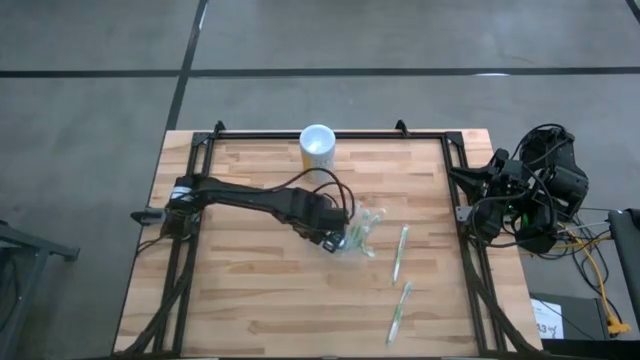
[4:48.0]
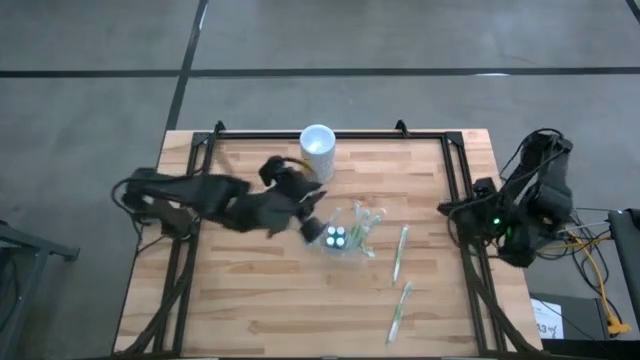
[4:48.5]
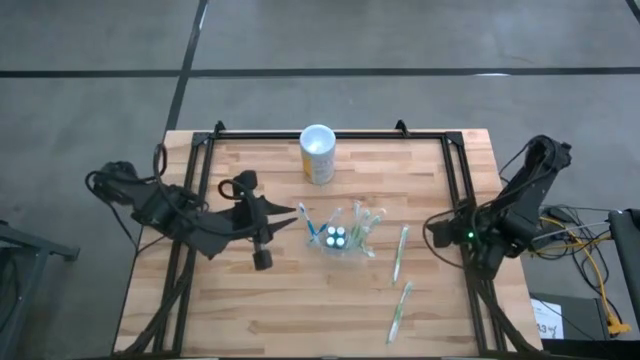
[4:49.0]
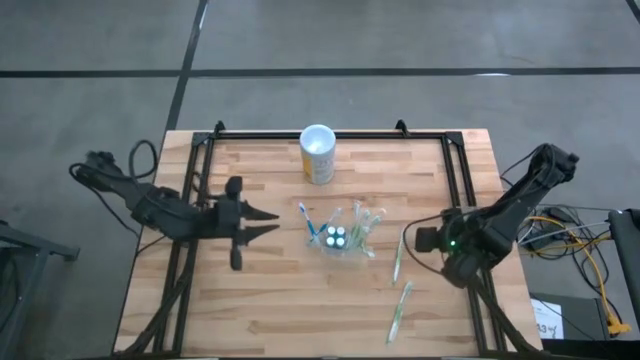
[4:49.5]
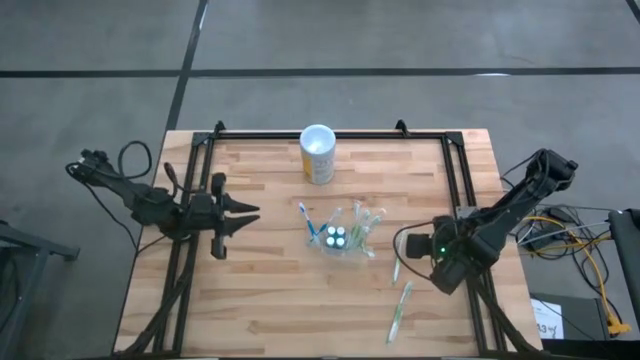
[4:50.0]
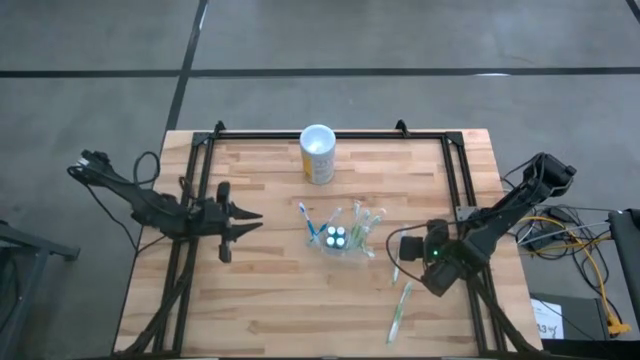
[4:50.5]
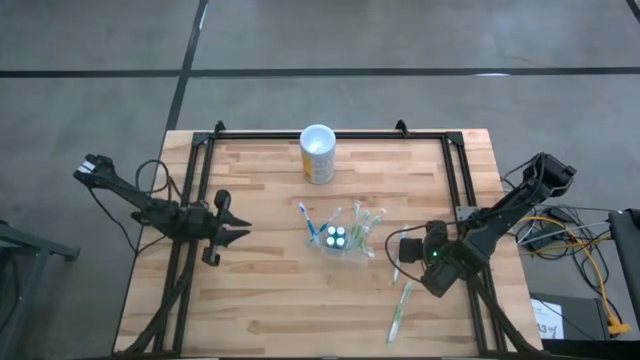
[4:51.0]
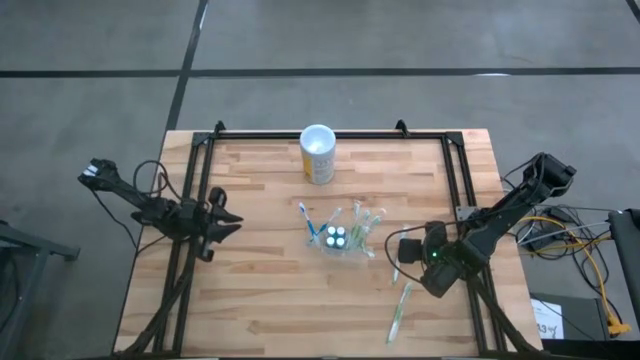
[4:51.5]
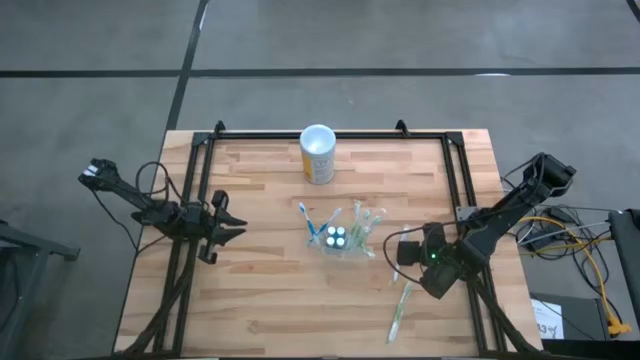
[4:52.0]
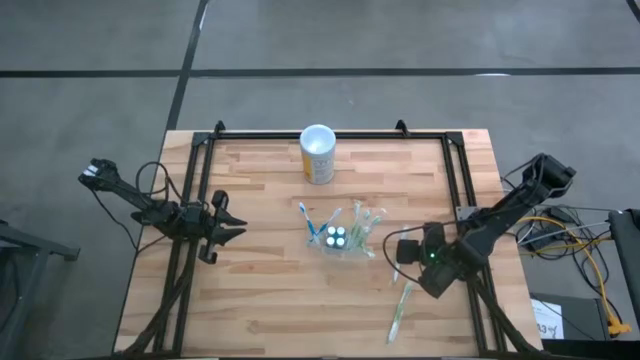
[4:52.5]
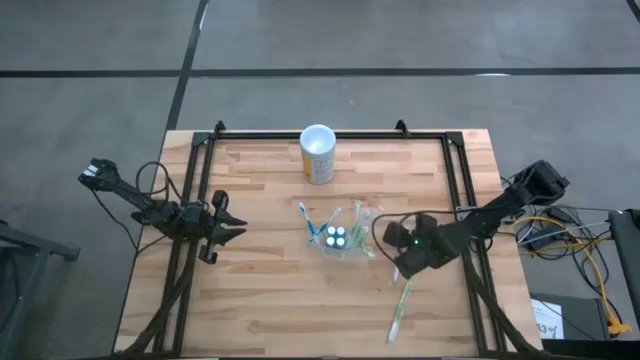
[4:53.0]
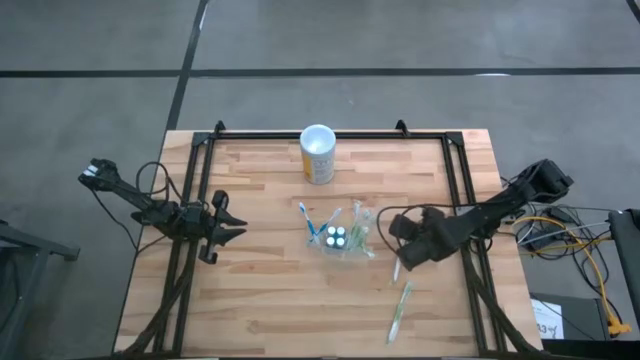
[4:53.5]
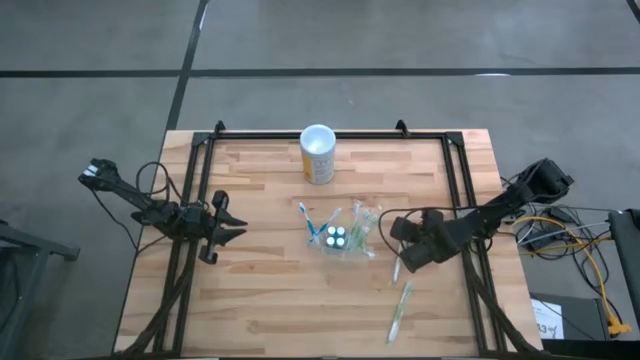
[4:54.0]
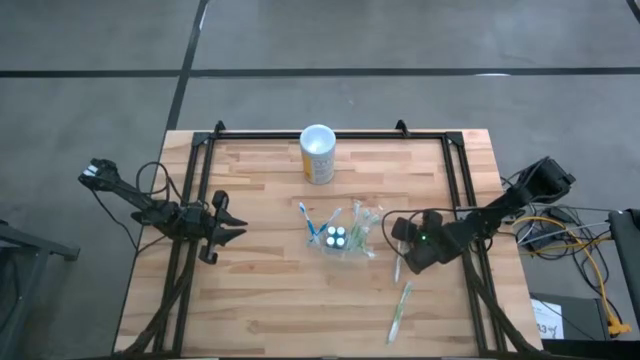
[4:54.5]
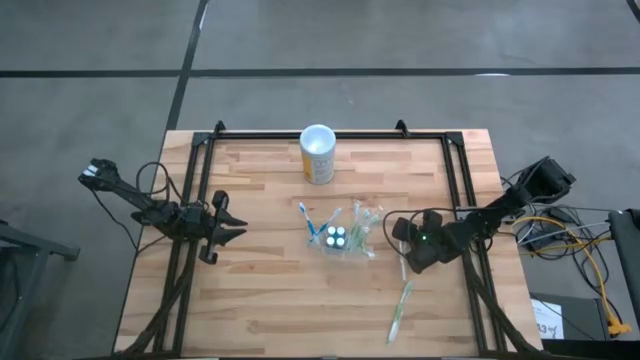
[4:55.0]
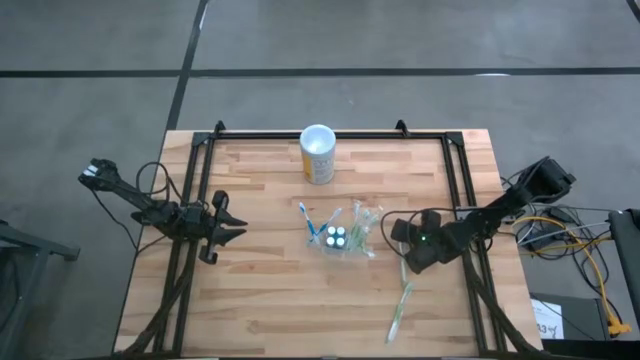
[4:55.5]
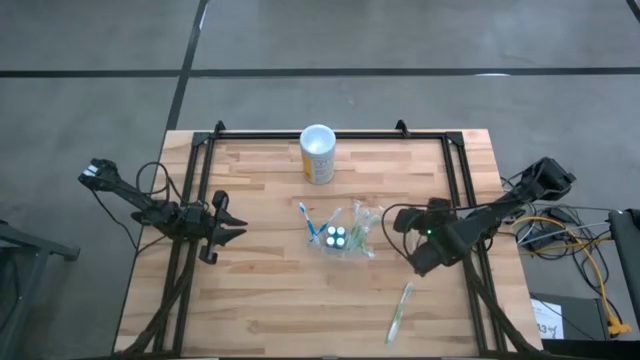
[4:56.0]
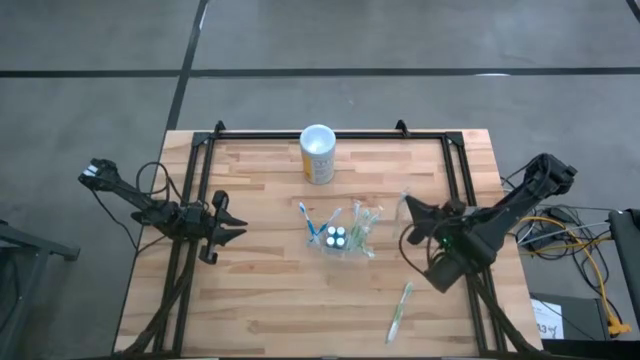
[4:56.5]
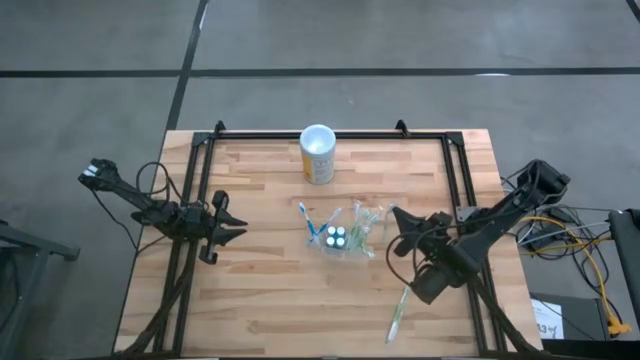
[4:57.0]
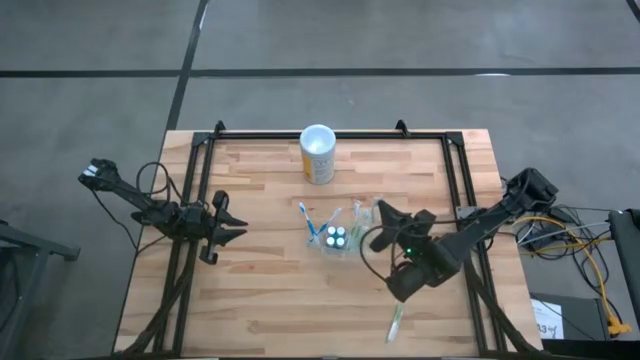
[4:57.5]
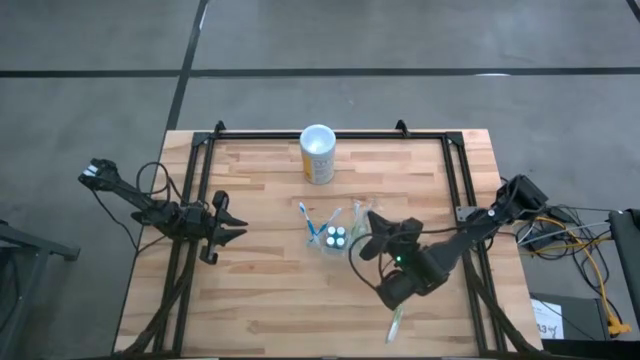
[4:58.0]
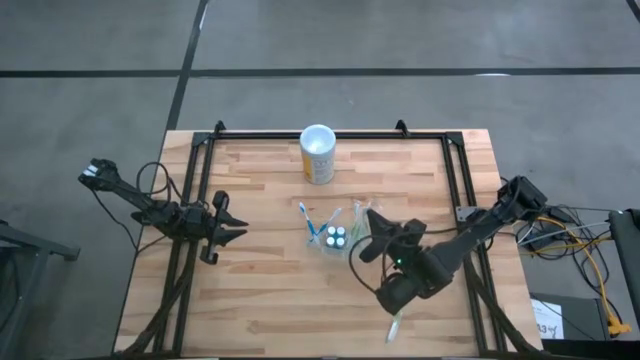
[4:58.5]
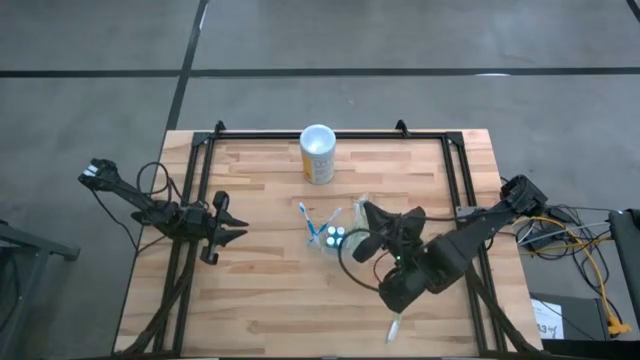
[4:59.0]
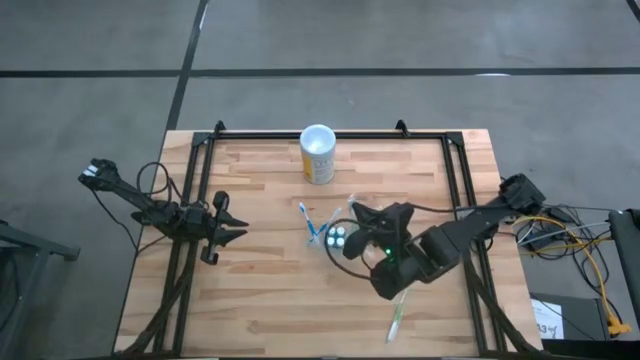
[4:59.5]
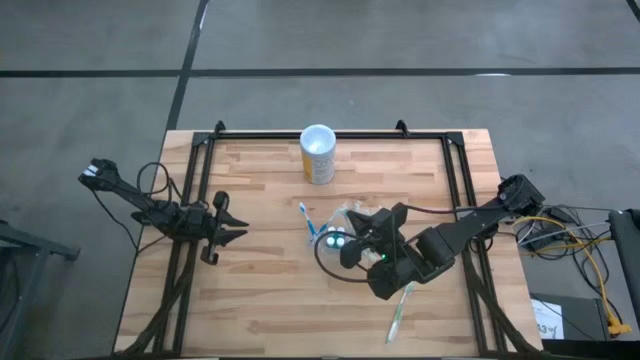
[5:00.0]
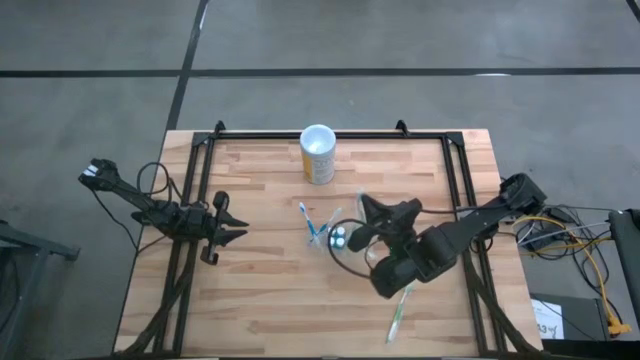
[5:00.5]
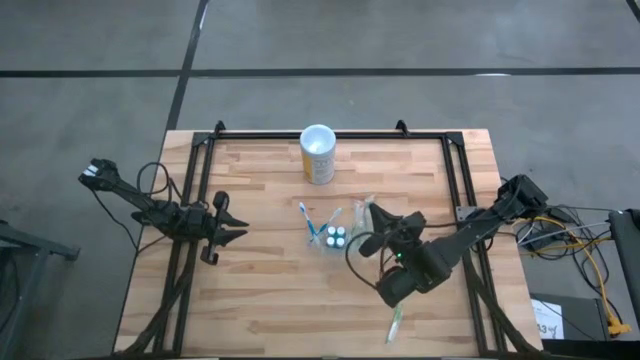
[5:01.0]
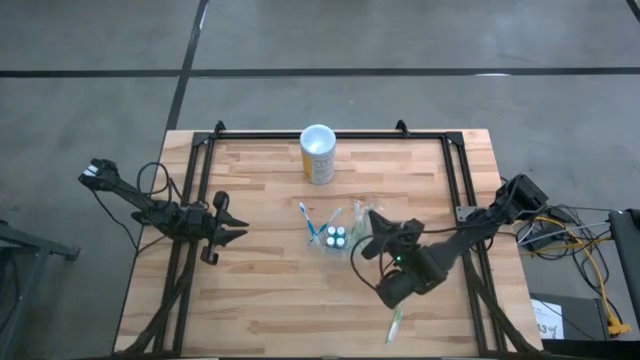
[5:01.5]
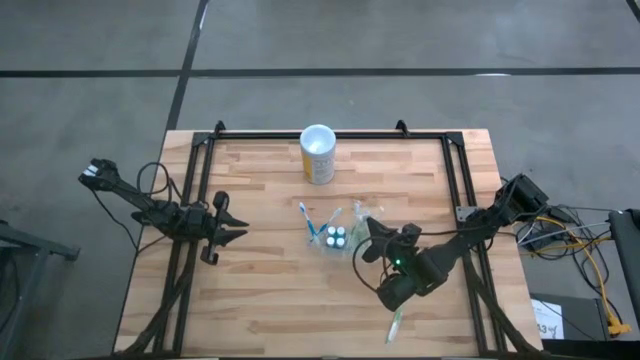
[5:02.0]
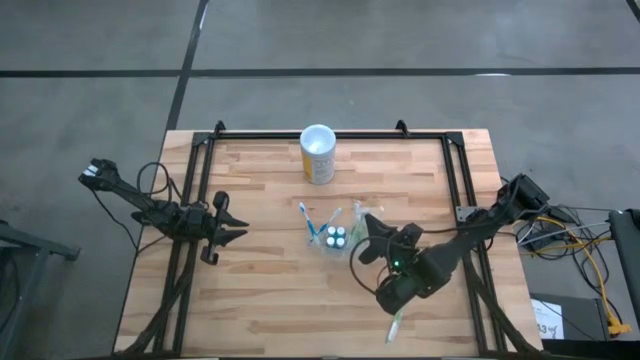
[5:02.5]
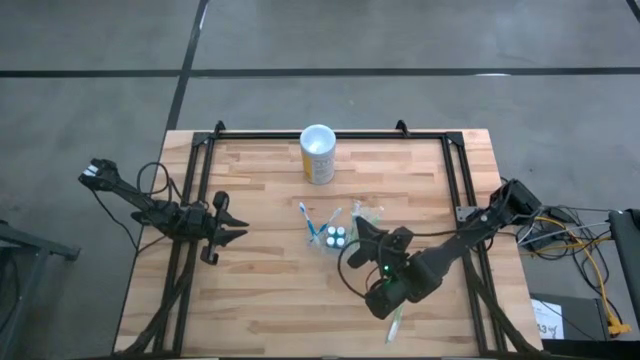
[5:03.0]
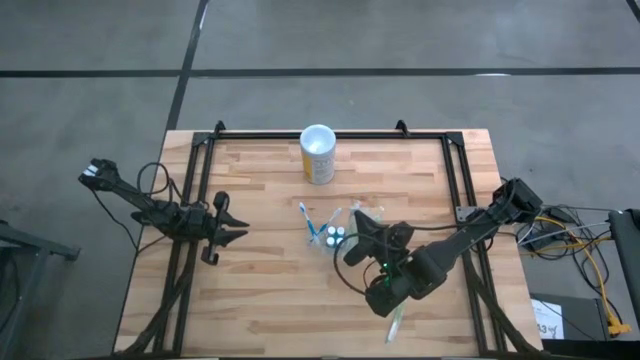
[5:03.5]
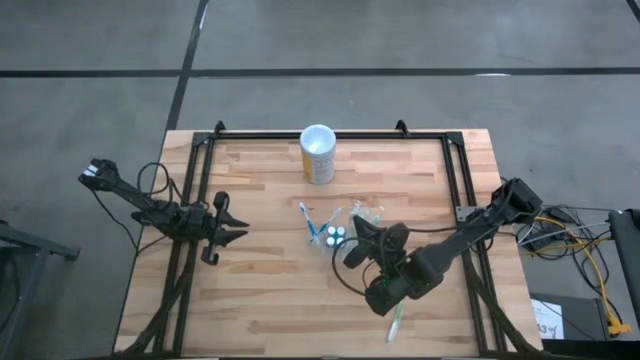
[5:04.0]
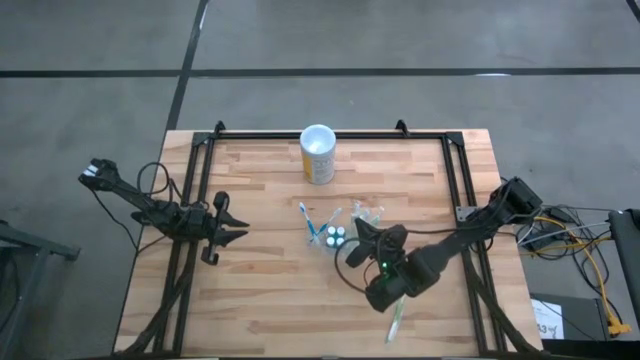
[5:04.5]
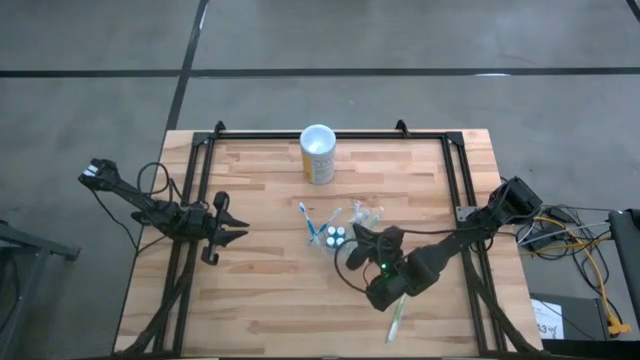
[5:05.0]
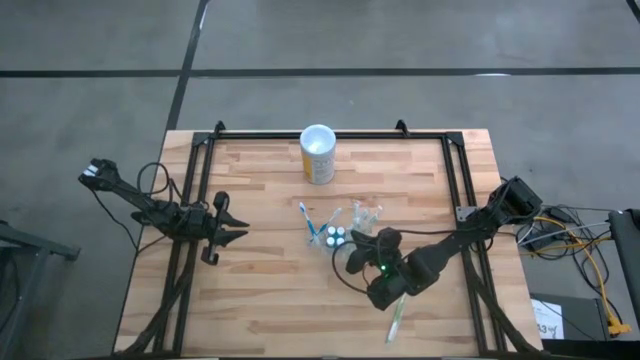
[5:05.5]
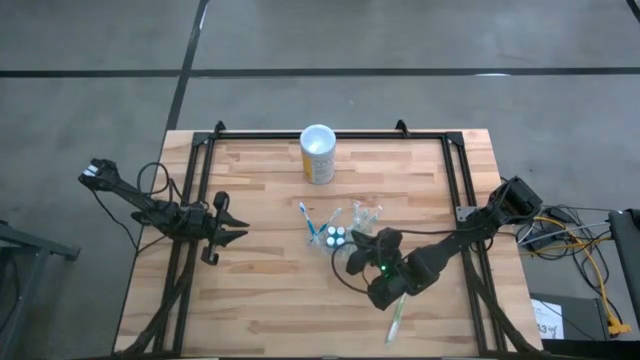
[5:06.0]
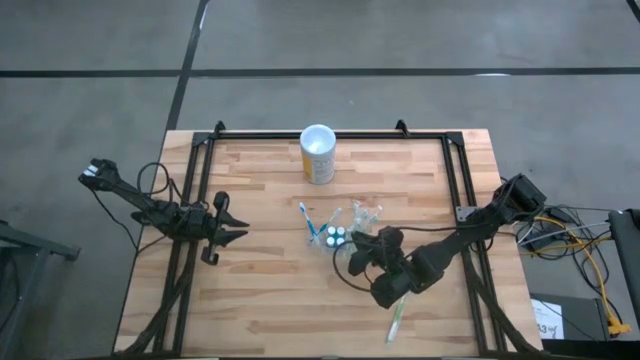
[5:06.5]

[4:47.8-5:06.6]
Task: Pick & Place toothbrushing station
Put the green toothbrush into the right section of the transparent organizer

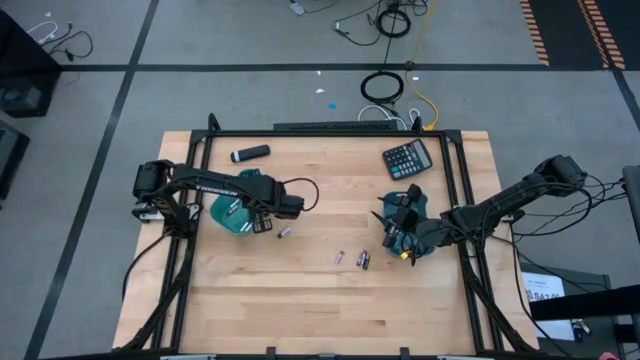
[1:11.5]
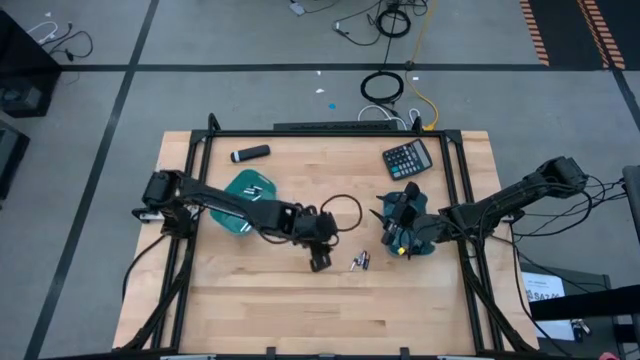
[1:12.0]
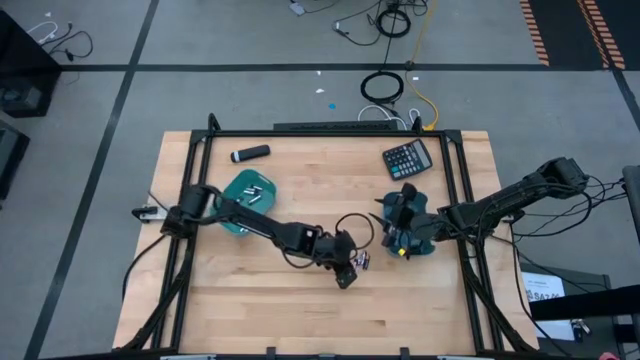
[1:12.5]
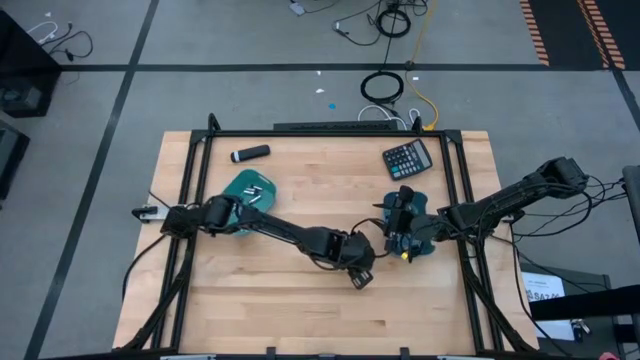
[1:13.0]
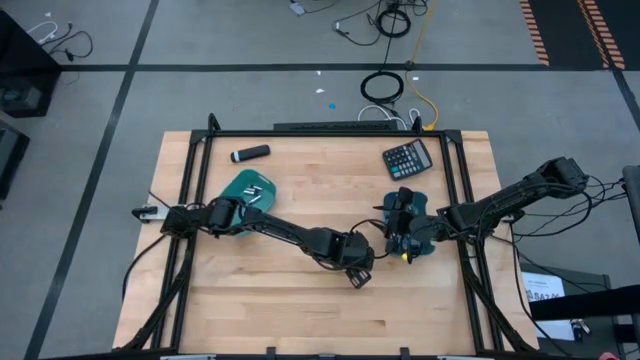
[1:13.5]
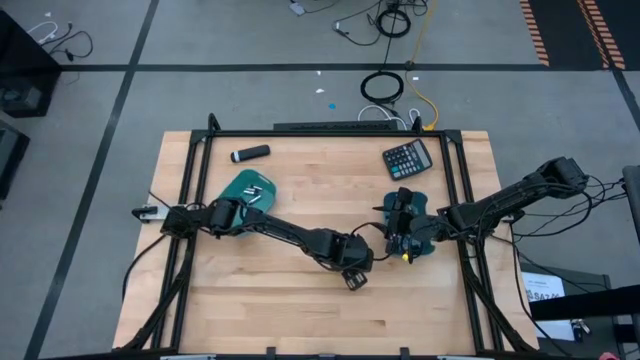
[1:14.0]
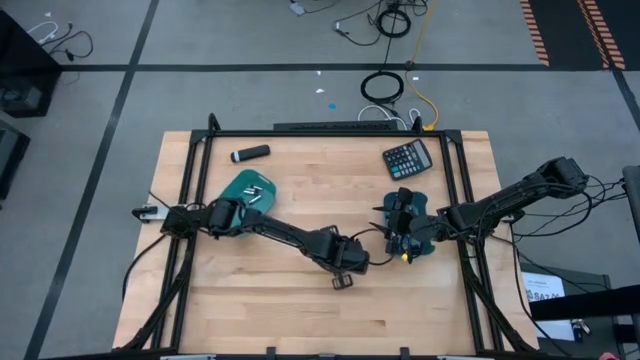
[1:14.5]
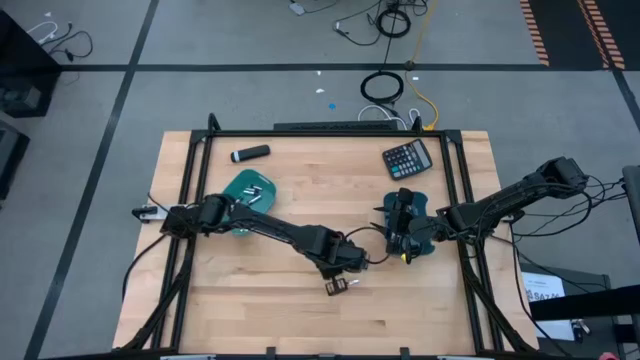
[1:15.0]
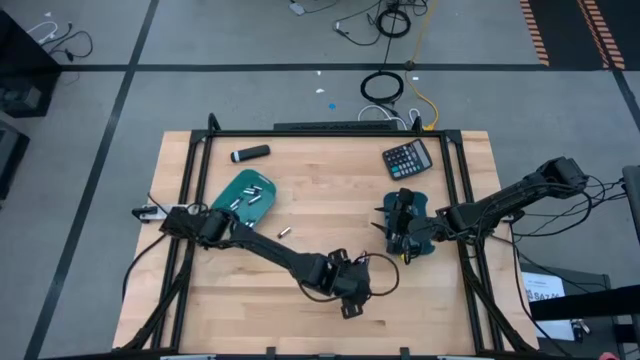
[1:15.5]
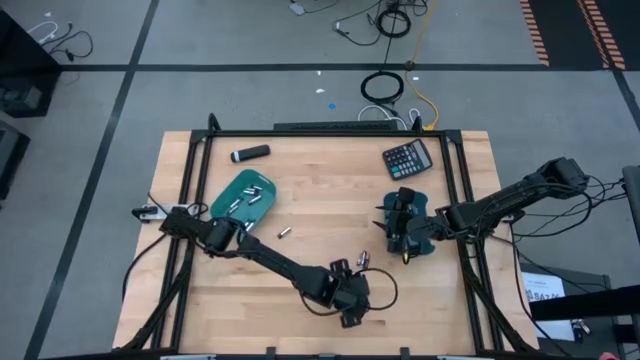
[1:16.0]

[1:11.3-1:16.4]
Task: Sort batteries
Put the silver battery into the green bin
